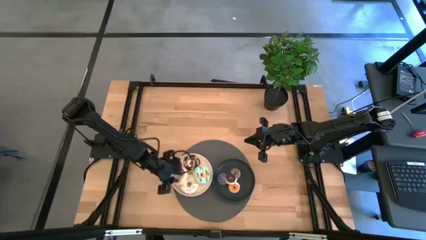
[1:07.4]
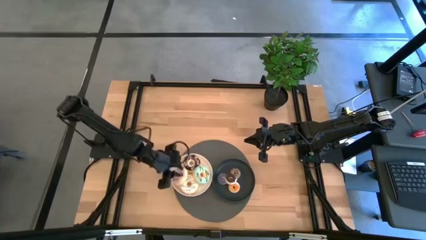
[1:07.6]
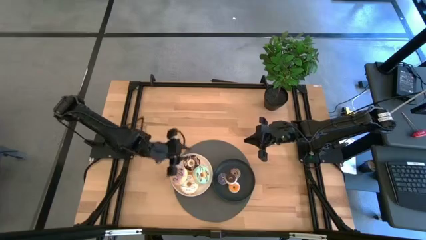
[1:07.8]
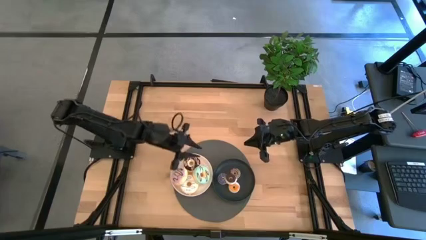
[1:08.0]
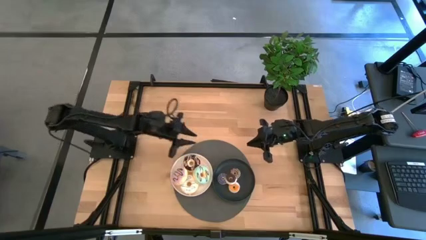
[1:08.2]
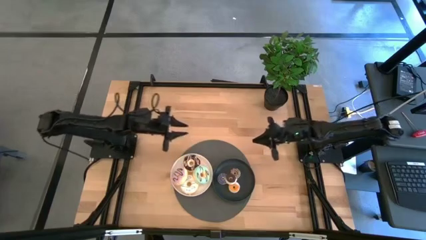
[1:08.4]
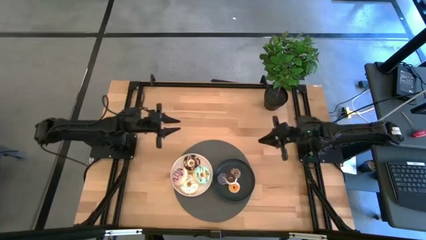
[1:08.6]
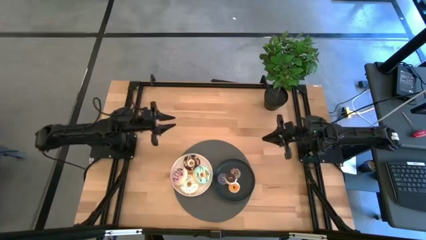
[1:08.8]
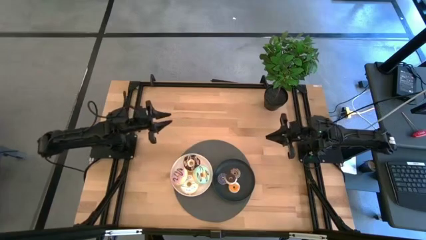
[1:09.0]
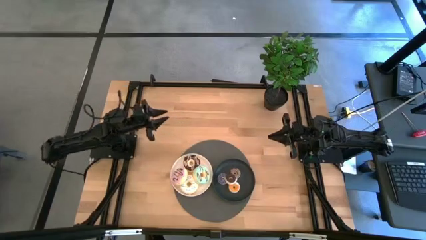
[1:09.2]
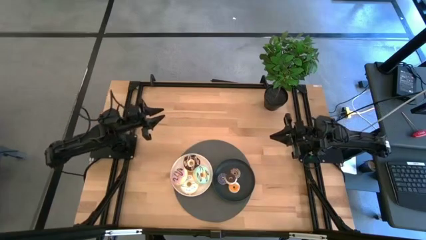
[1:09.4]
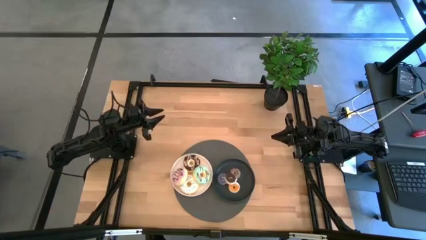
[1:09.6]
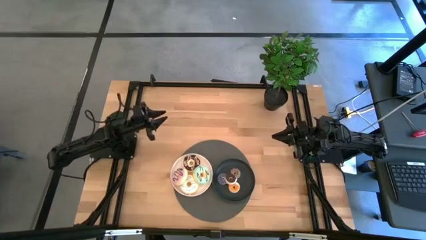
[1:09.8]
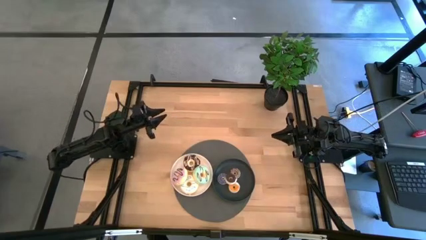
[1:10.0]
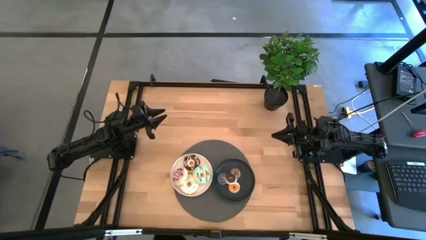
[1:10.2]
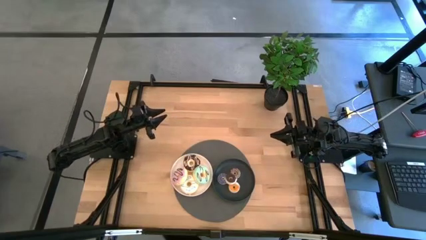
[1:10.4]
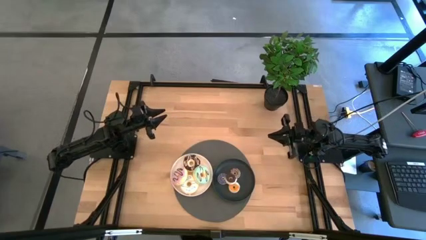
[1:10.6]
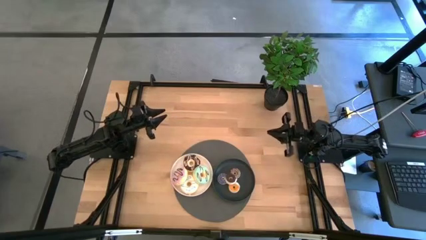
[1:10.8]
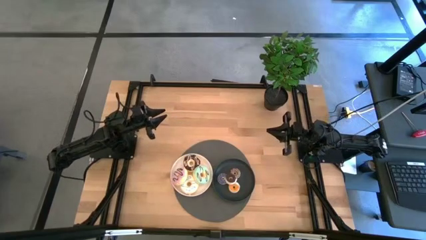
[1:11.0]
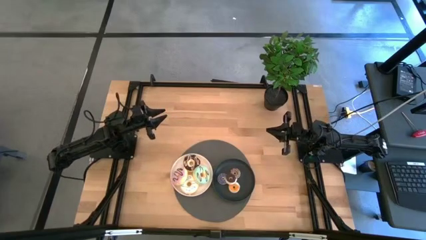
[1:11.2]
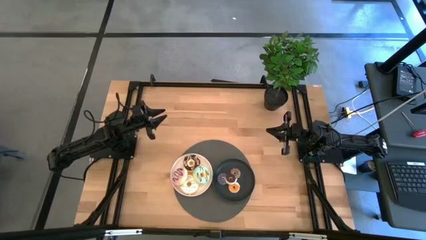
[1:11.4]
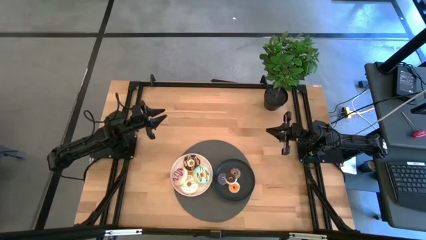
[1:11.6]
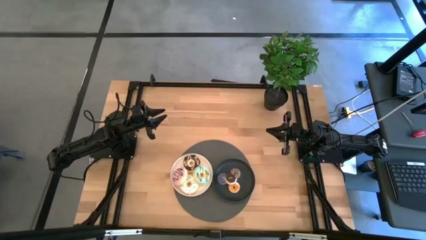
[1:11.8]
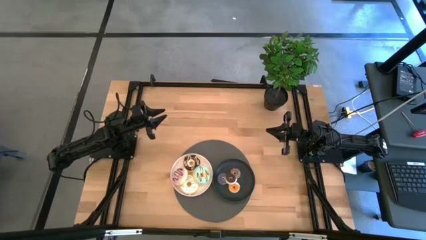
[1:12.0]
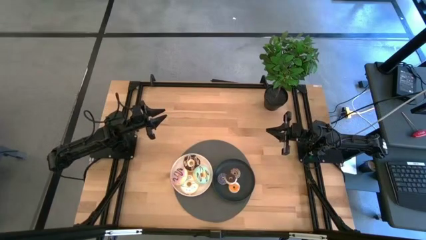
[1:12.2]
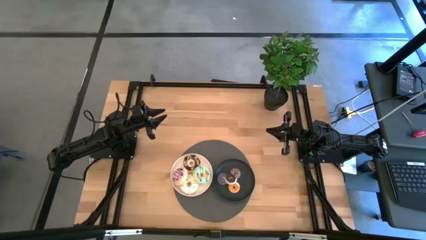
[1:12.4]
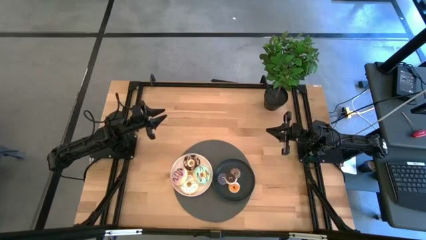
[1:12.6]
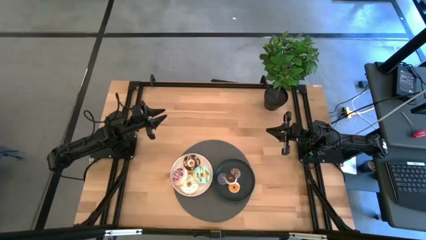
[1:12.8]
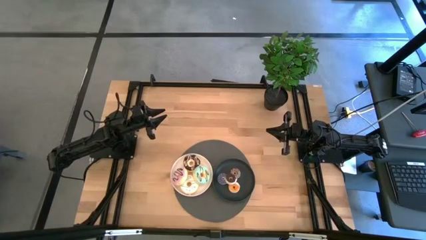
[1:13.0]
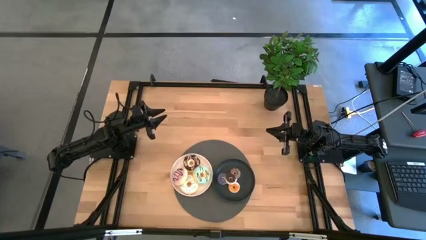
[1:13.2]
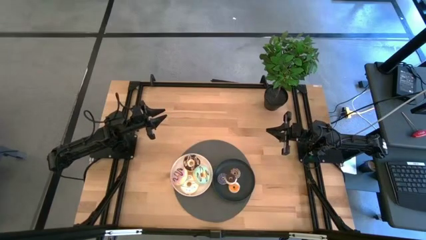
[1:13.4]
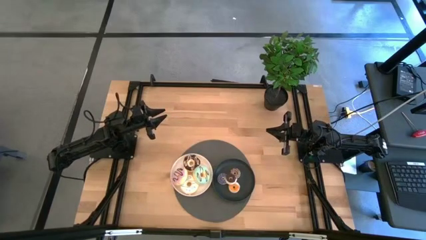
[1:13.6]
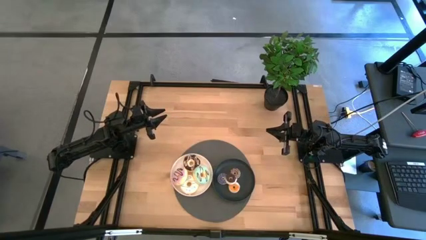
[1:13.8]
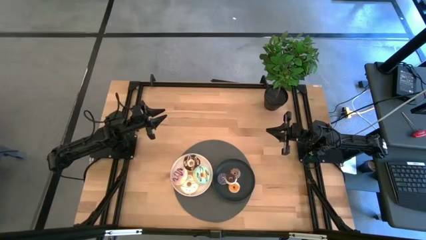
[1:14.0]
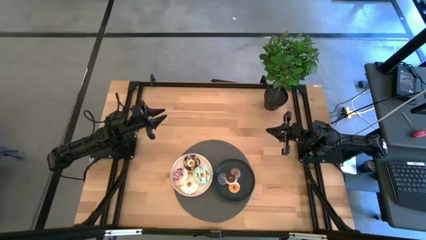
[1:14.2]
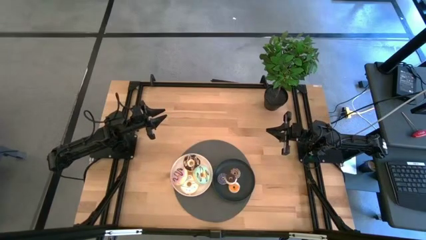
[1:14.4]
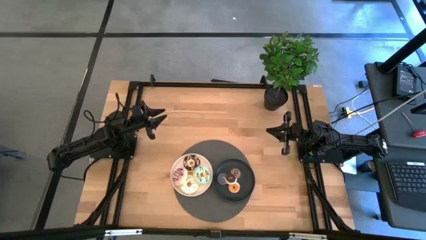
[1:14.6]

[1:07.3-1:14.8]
Task: Pick & Place donuts
Return to Home Position
